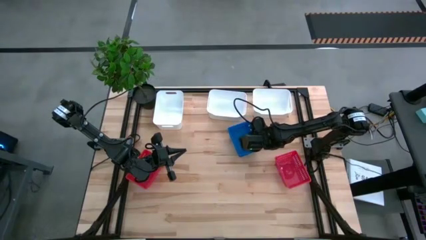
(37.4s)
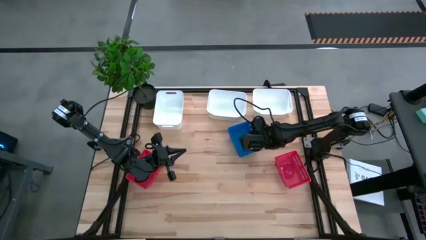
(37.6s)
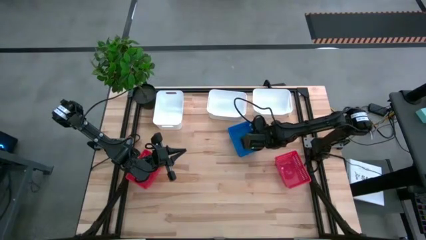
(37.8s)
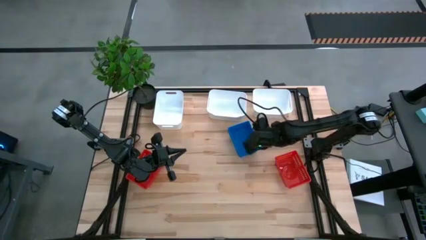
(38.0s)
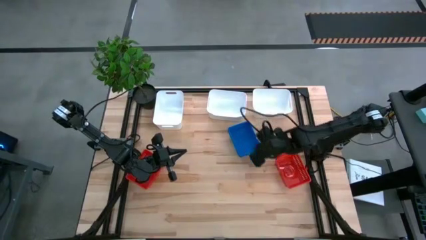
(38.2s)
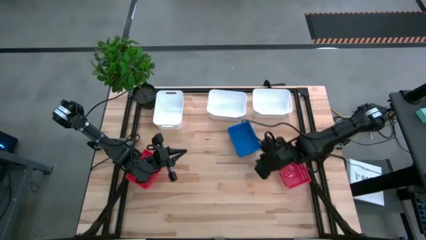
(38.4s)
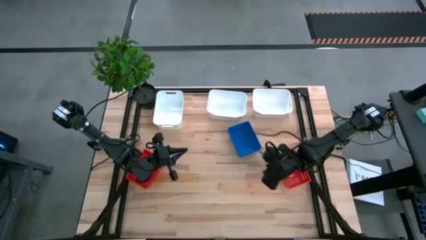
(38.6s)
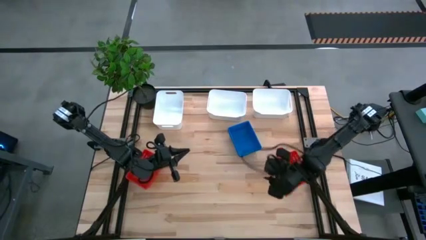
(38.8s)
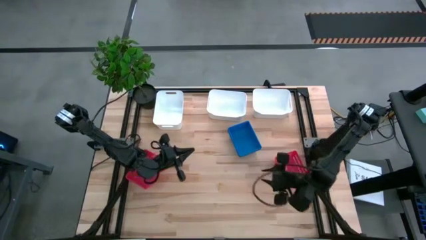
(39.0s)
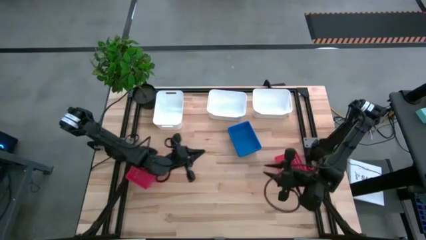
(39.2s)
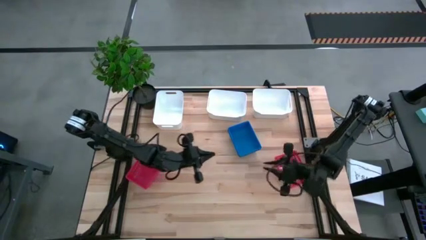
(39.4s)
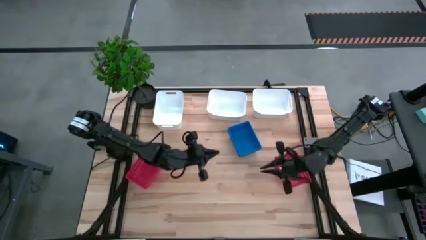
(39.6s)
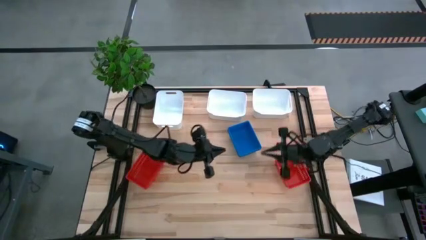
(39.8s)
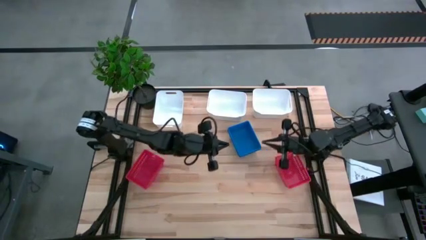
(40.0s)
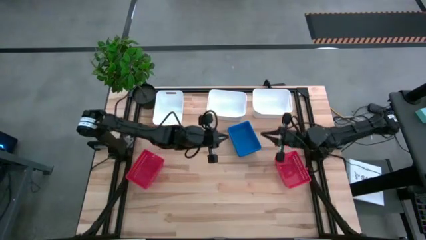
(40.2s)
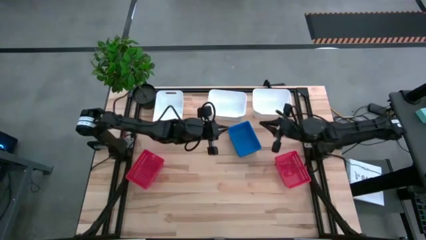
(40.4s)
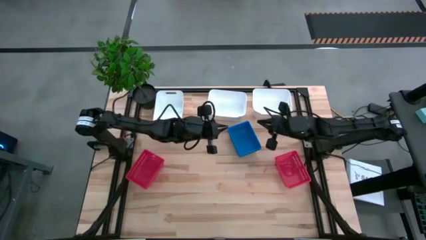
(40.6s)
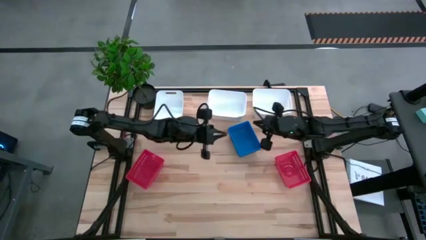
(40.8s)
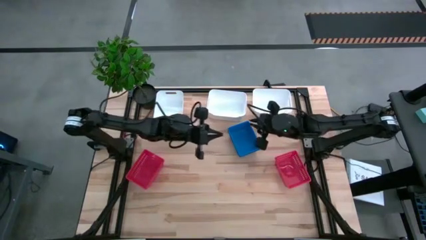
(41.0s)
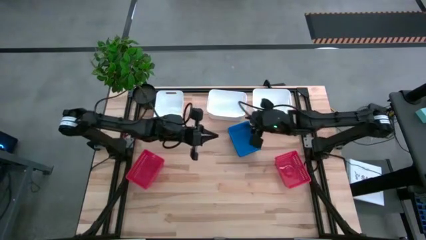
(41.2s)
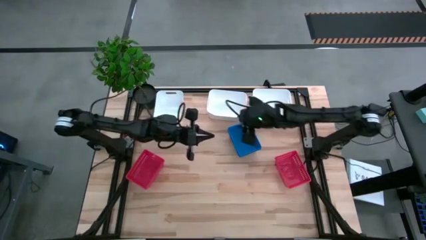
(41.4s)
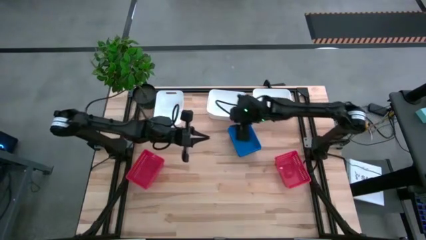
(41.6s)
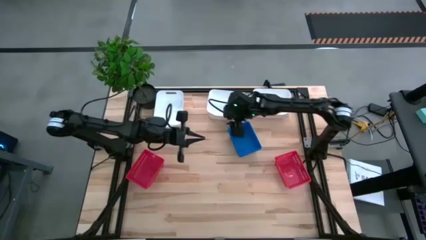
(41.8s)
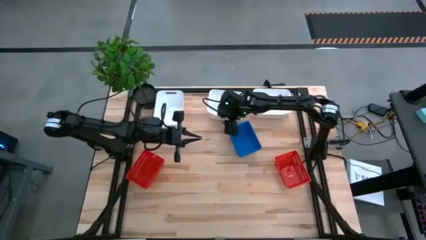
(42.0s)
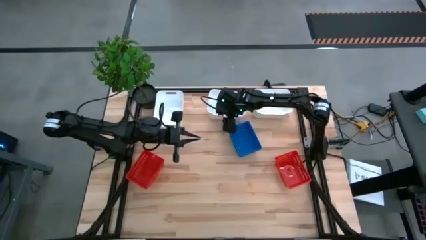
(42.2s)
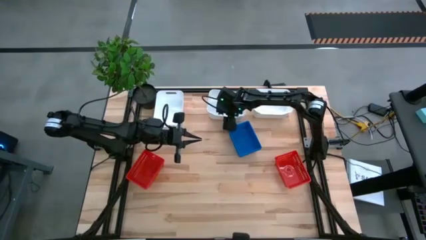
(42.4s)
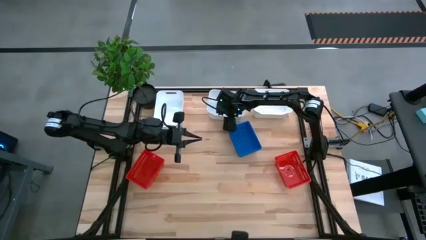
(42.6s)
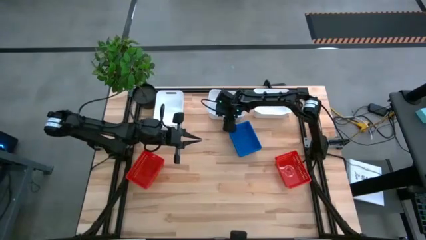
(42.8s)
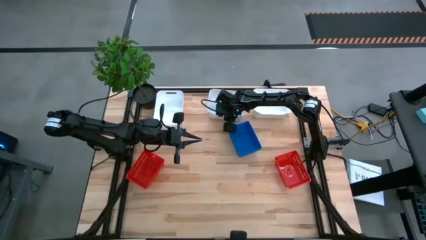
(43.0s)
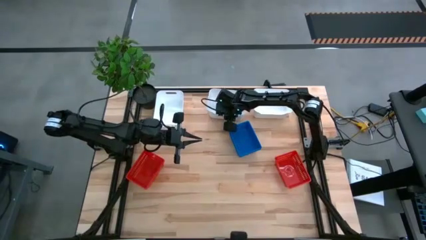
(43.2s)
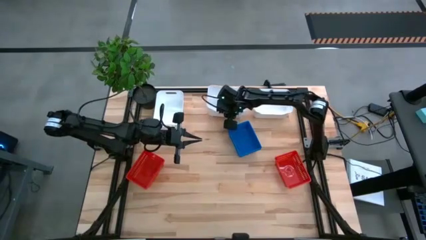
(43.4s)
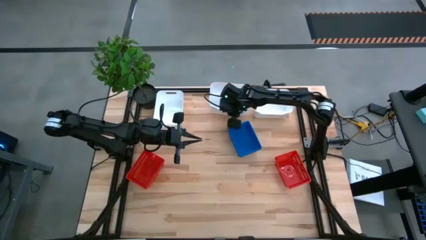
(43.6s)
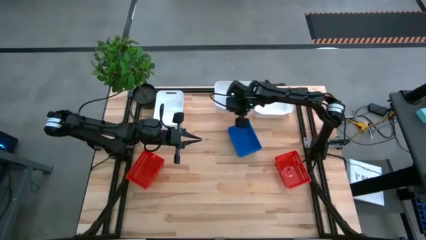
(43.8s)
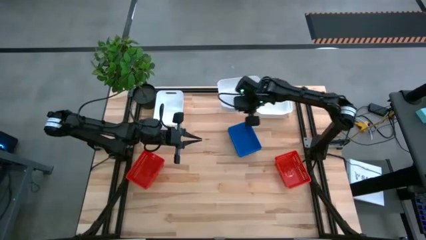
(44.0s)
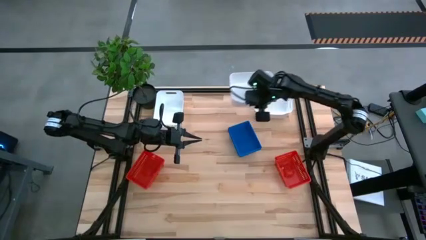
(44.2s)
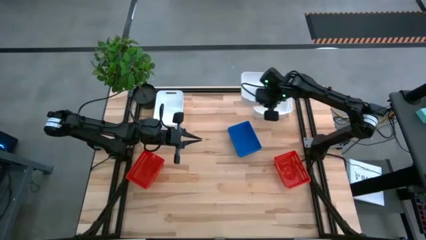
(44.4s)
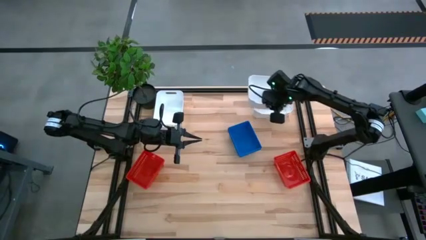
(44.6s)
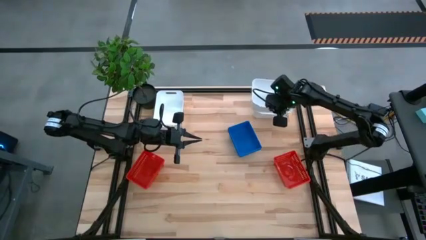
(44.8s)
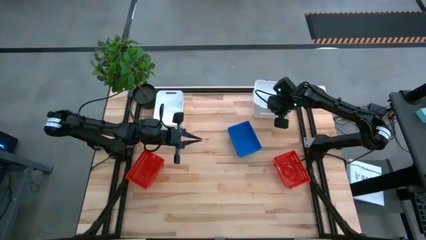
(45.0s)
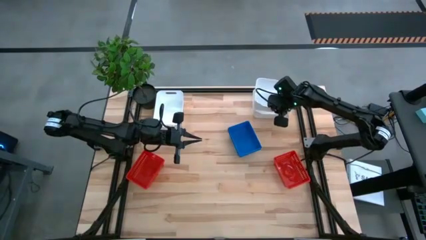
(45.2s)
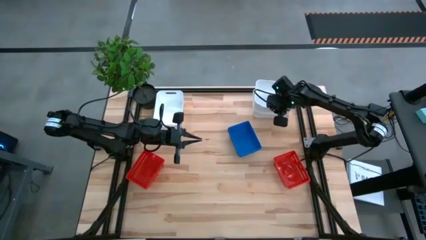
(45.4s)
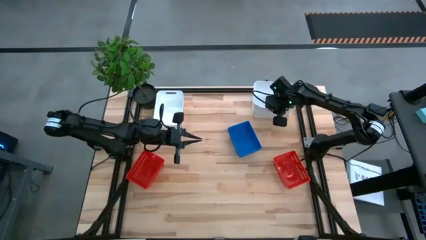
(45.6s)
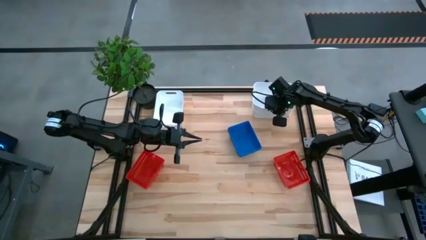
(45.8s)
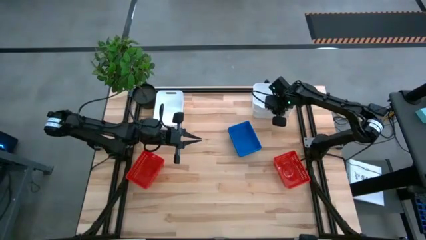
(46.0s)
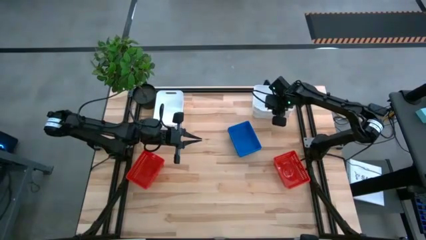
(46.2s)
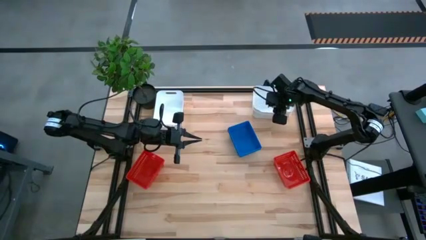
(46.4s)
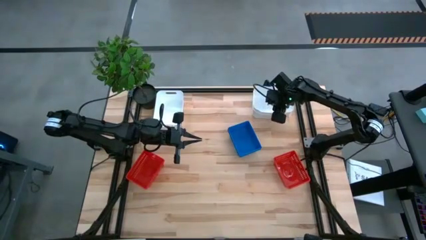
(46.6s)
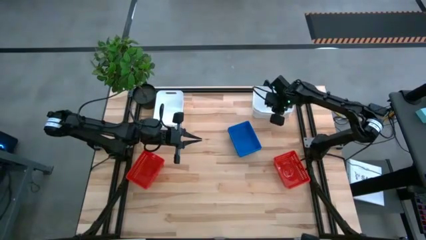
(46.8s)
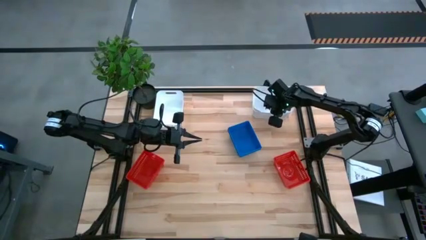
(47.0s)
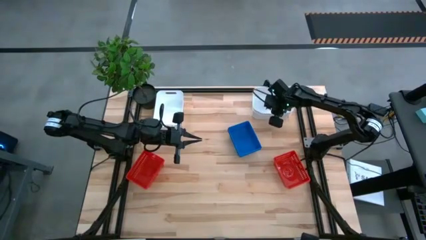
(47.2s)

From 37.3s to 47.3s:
Stack the center white bin on the right white bin

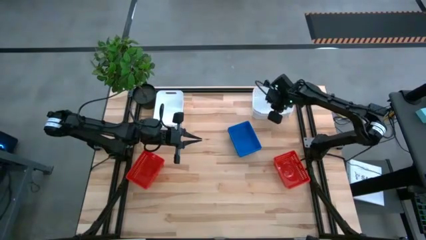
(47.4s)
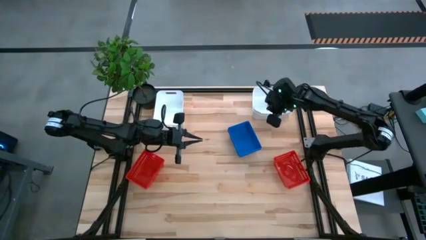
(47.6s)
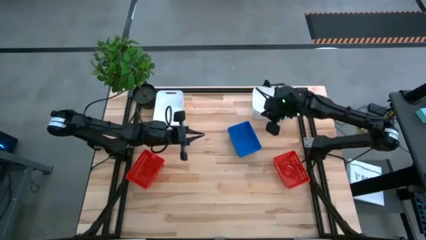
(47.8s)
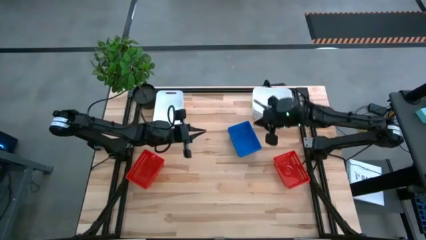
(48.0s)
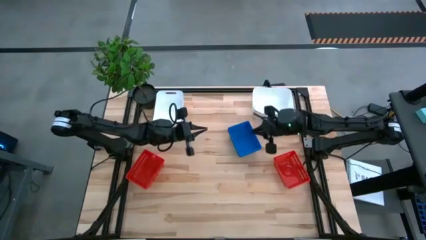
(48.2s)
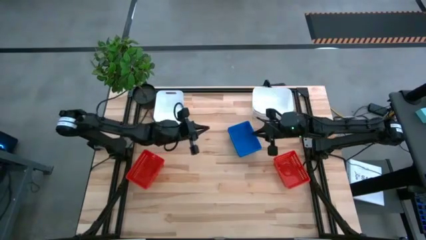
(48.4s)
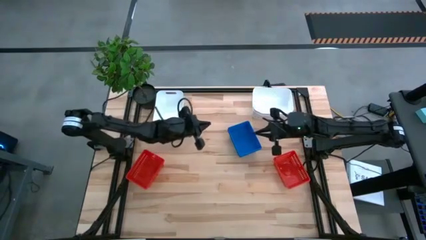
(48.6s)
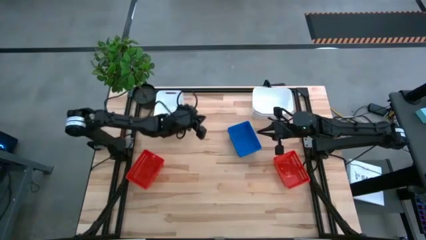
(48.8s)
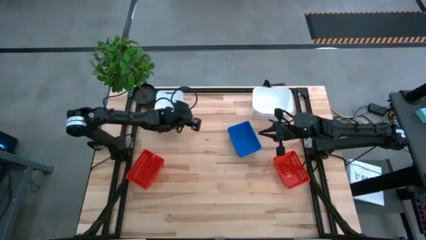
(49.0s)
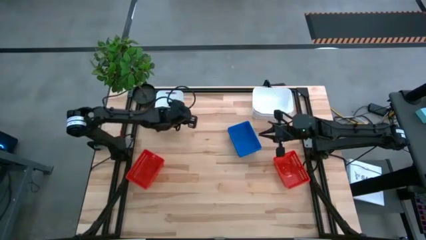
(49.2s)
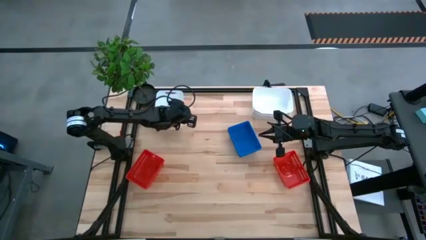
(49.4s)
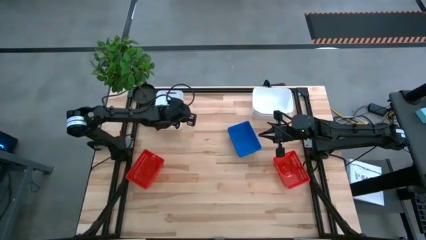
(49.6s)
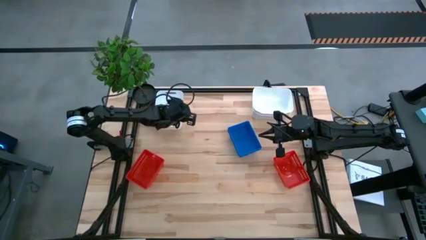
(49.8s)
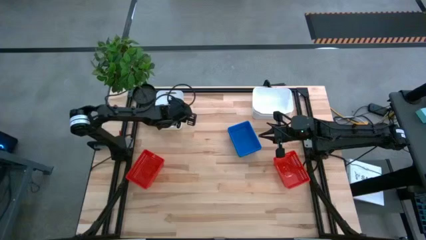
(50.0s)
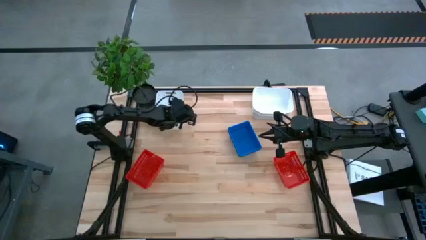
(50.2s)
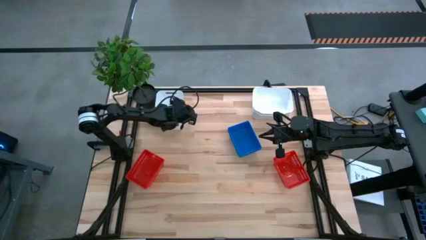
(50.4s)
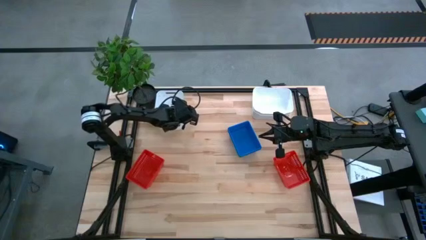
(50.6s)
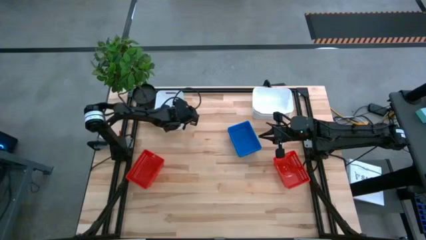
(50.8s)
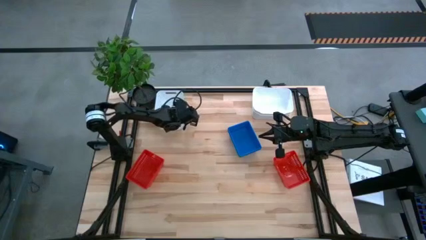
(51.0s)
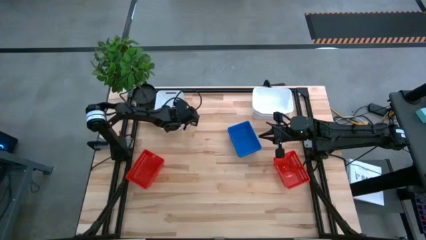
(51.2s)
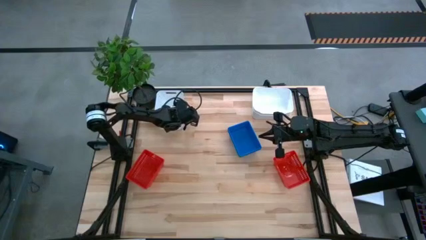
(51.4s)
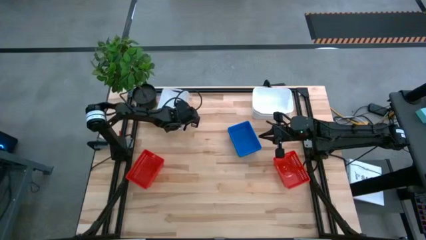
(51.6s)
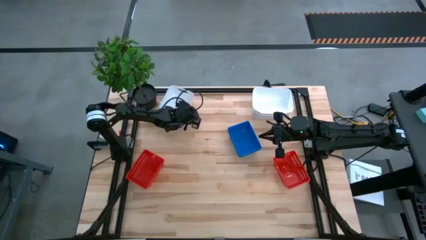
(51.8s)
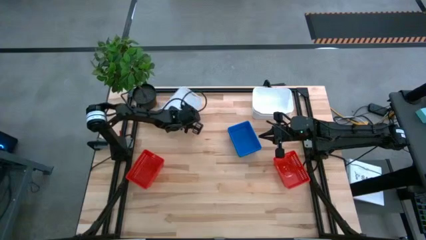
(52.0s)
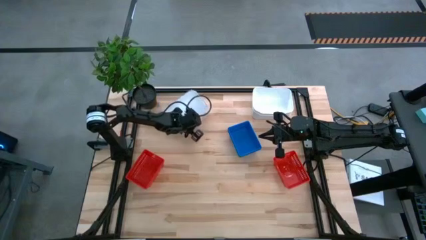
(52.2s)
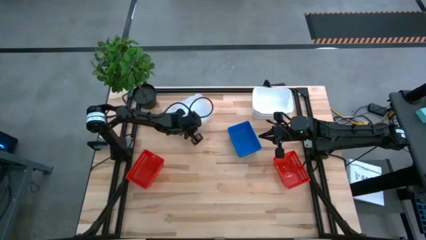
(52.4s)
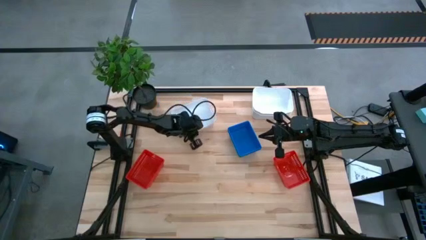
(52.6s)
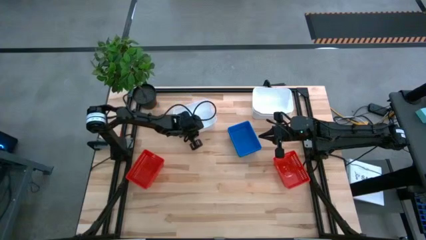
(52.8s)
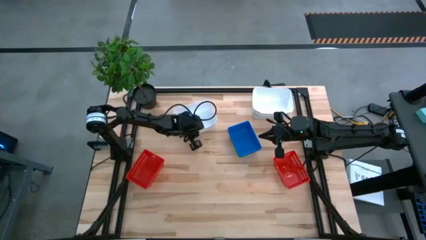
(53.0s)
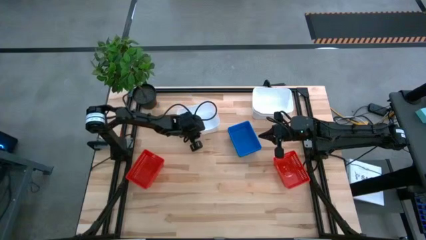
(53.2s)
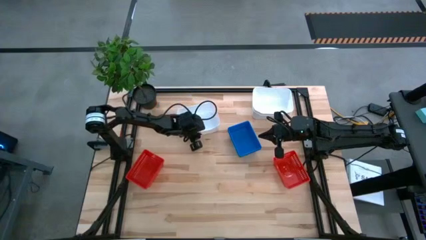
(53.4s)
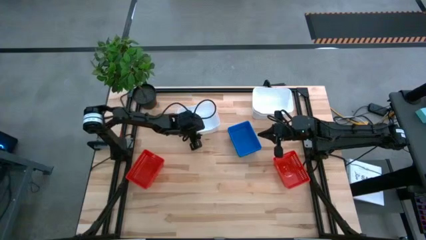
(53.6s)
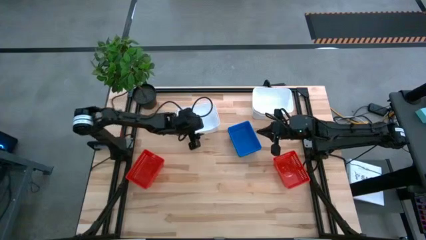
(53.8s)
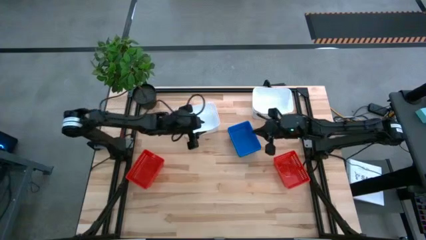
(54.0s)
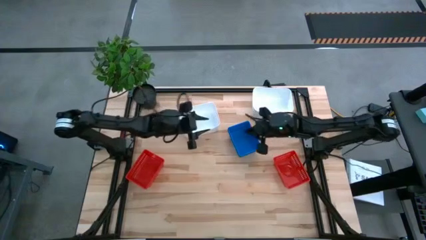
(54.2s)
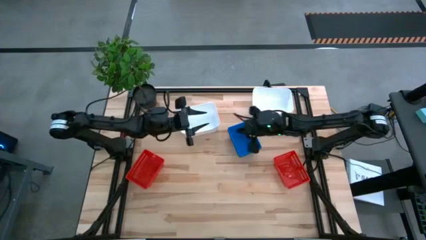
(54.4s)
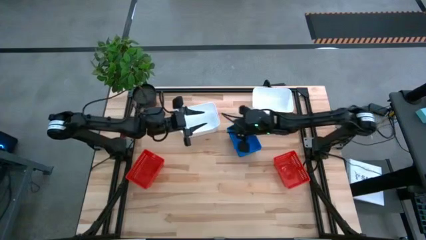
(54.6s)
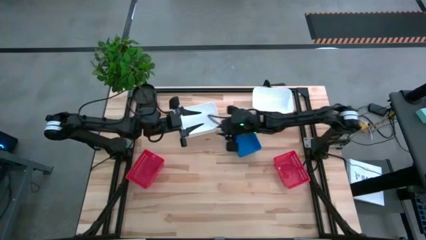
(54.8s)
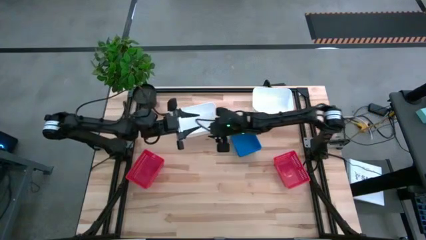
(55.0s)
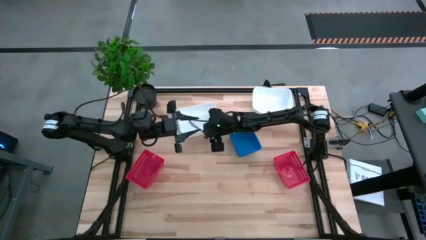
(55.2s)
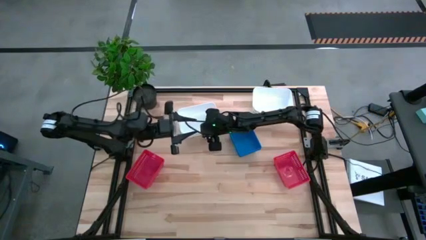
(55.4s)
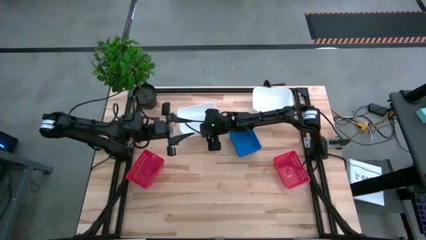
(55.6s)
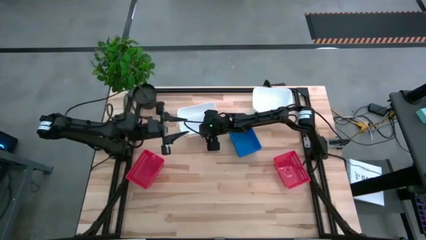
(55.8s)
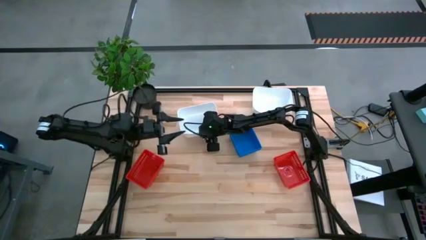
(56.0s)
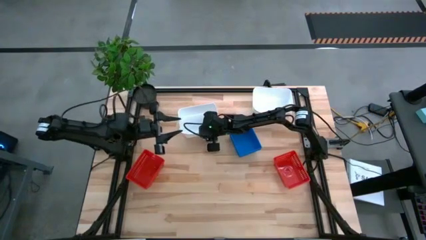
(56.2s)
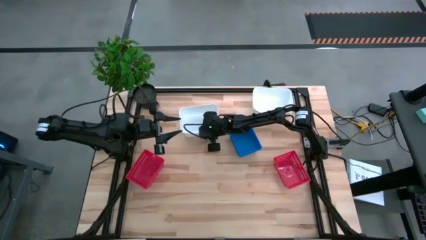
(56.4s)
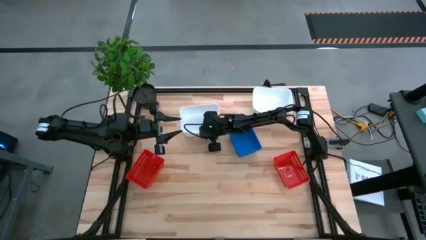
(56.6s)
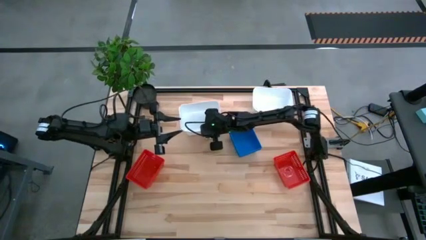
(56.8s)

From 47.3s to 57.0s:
Stack the left white bin on the stacked white bin
